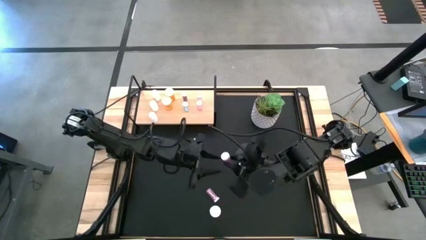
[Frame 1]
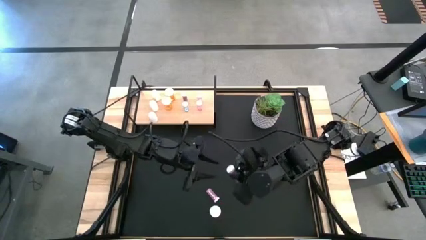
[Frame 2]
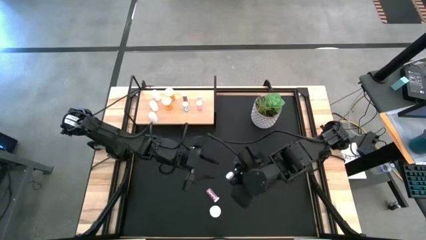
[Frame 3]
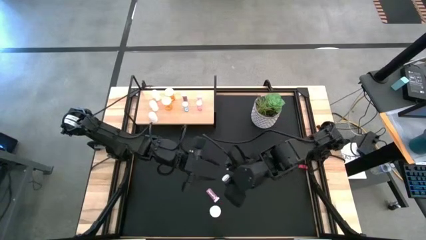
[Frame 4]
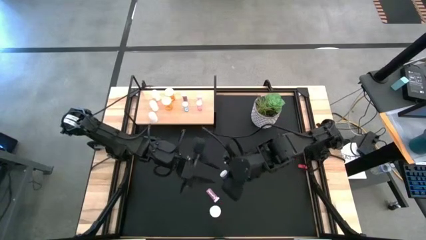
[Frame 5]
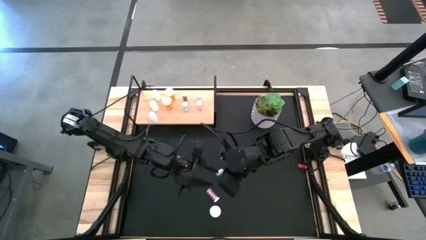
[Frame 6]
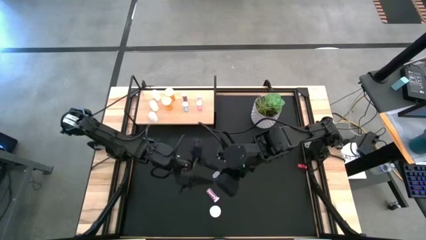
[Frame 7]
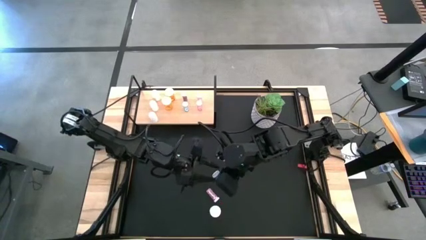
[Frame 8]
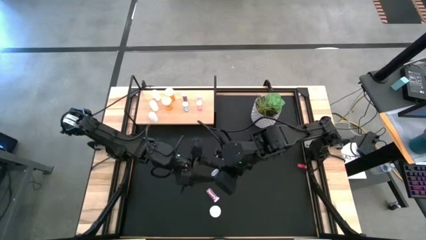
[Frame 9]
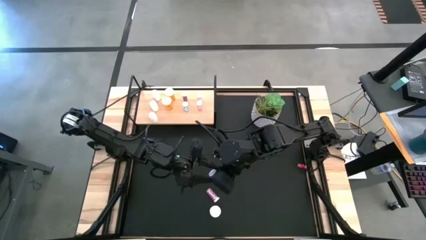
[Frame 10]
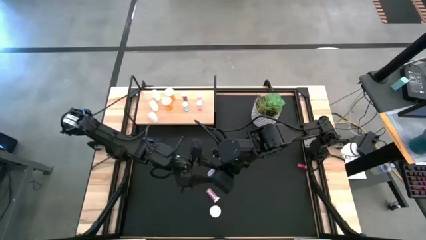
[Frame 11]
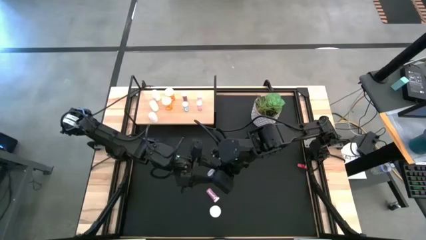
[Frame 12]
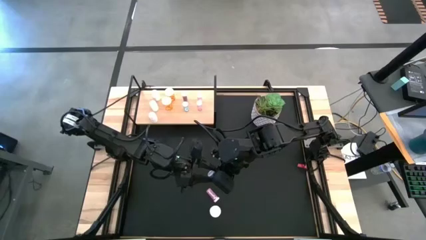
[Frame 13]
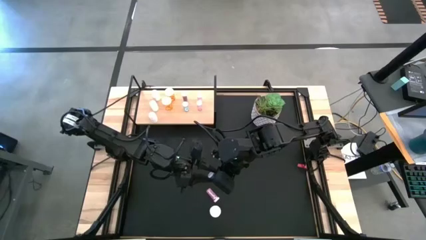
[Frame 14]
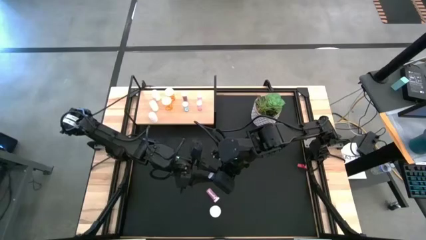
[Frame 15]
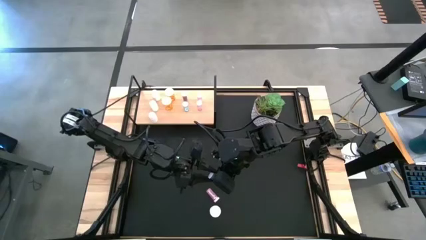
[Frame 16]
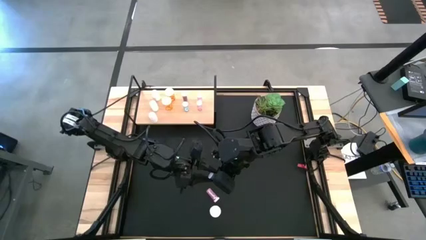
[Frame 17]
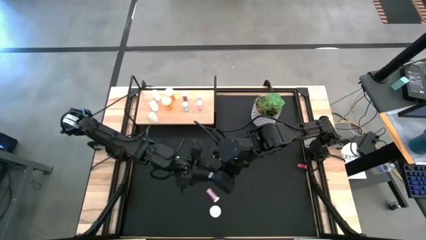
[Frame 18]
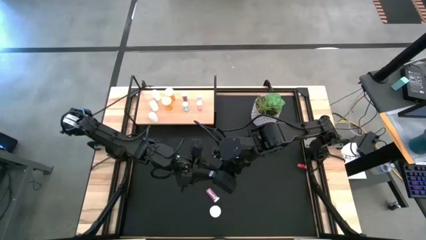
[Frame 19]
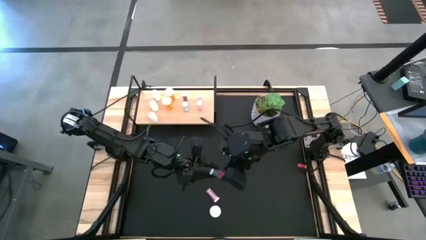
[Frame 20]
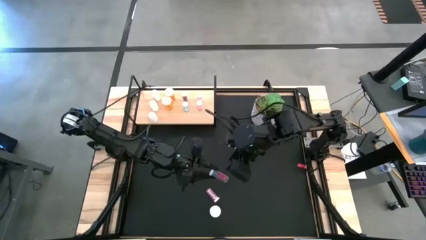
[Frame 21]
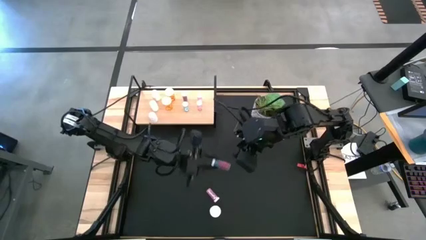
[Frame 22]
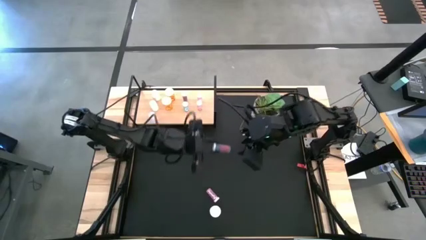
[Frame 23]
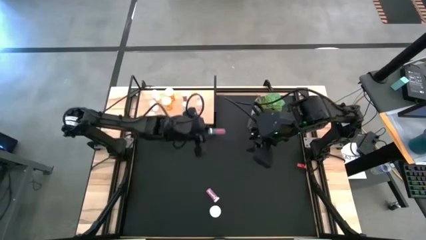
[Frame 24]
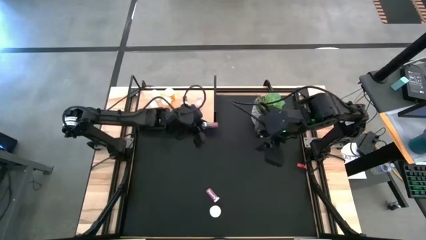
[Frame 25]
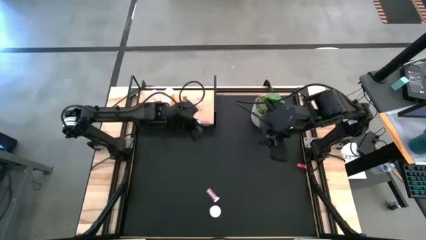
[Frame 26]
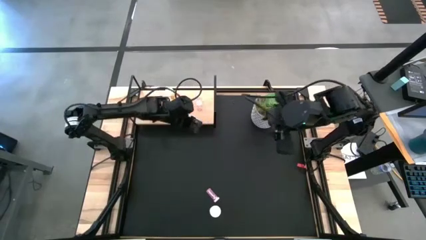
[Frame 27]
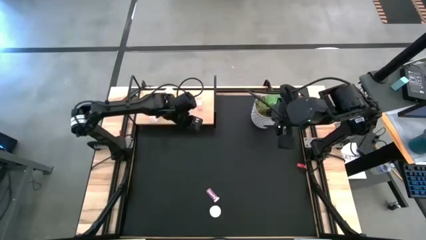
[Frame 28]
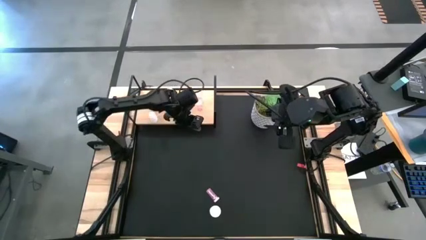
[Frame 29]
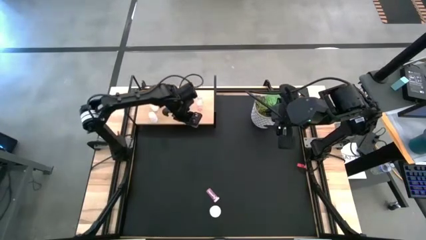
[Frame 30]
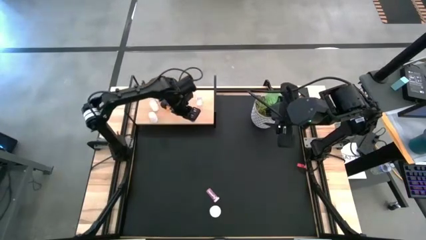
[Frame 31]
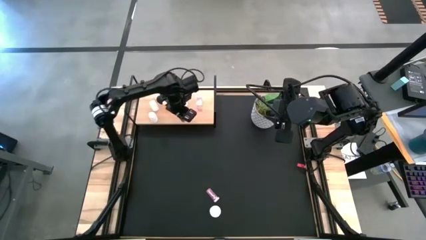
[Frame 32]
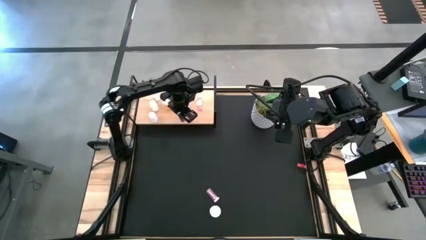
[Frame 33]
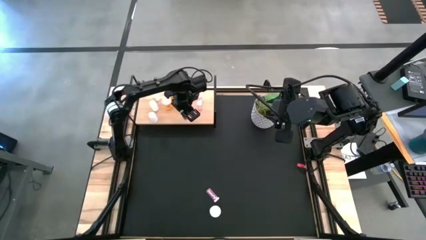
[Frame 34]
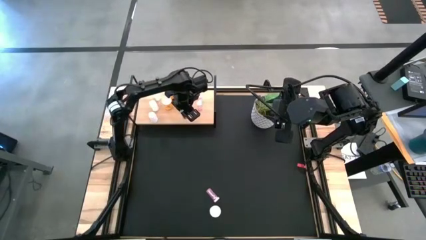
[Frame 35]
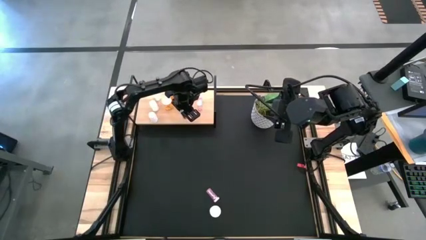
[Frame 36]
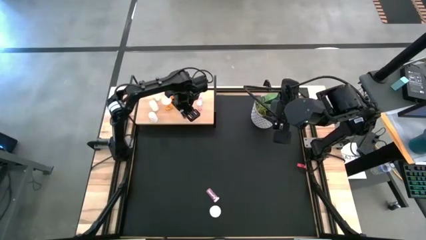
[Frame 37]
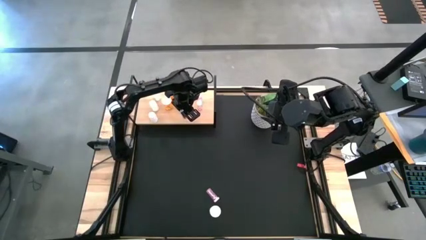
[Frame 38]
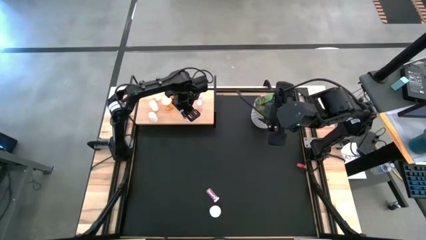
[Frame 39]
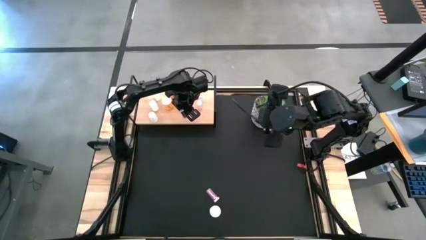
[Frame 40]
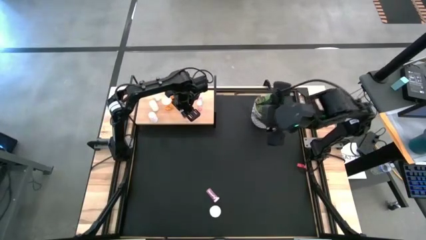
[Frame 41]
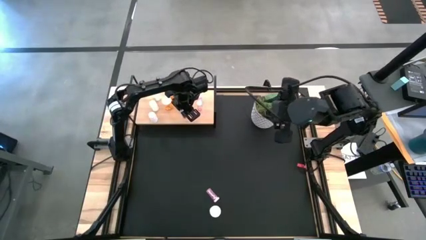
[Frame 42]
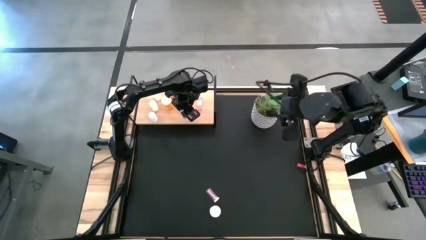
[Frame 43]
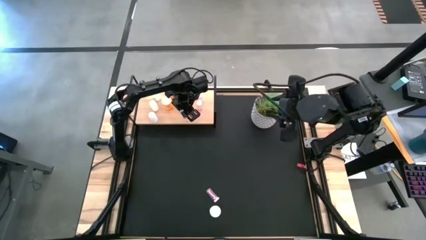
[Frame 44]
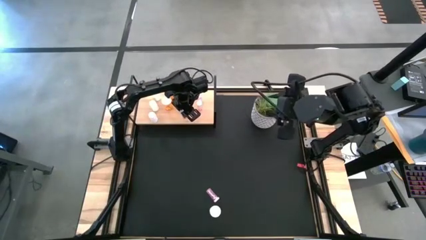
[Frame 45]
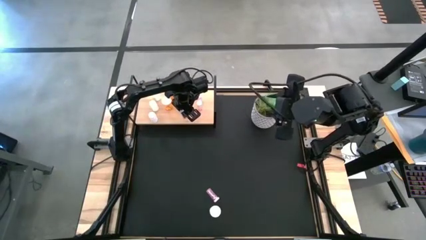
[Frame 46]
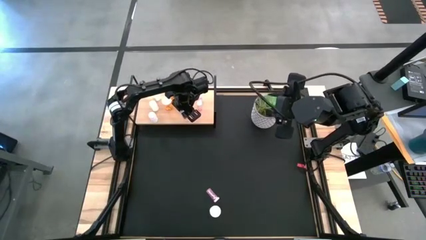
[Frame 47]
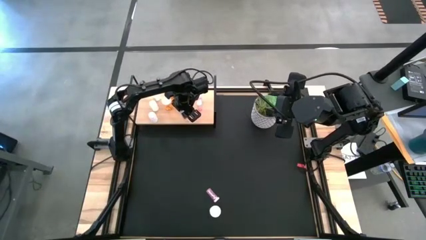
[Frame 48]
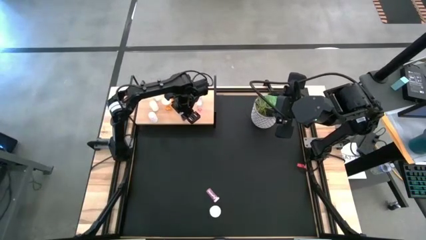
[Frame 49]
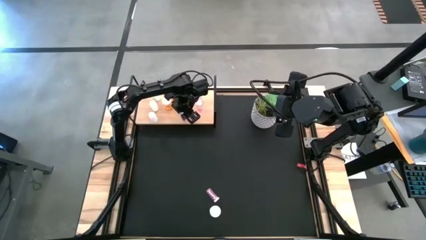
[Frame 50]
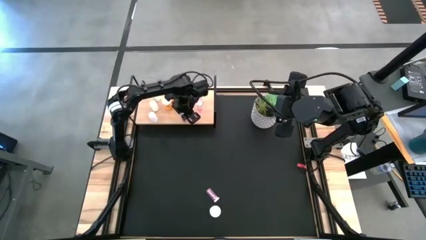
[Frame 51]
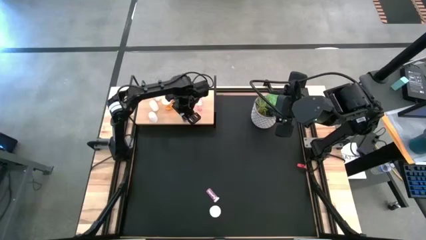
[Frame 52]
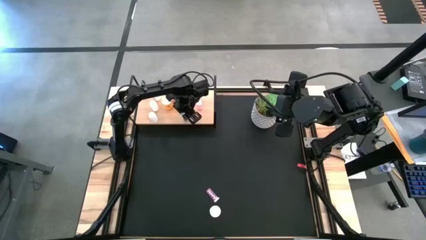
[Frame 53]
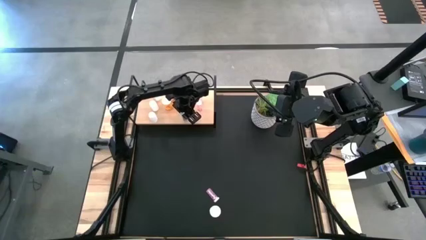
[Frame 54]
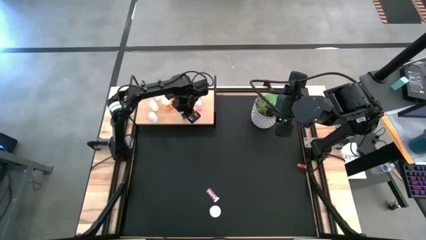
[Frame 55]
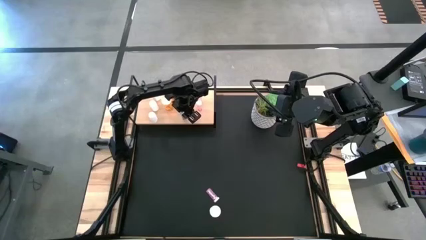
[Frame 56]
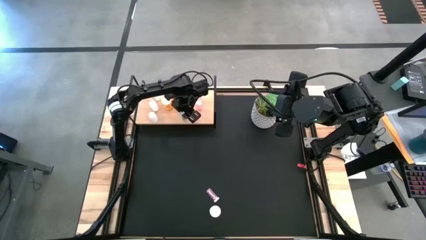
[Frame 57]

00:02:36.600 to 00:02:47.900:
Task: Pick and place medicine bottles onto shelf by color
Put the blue pill bottle on the shelf aligned with the other blue pill bottles

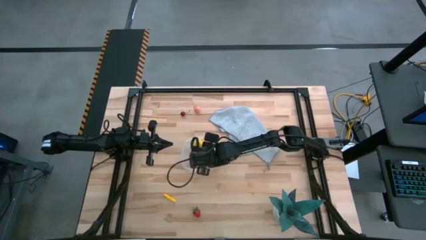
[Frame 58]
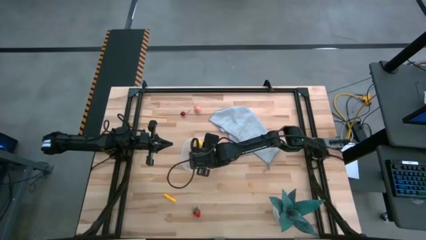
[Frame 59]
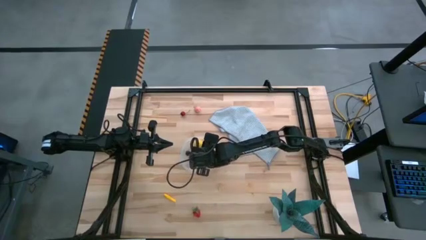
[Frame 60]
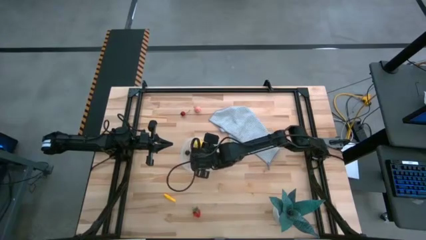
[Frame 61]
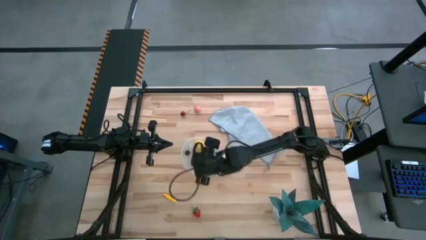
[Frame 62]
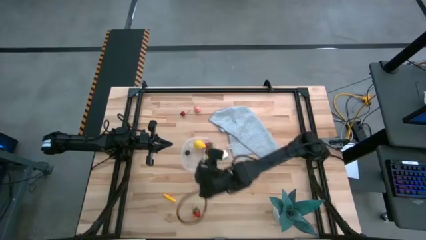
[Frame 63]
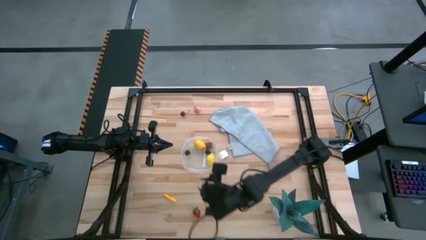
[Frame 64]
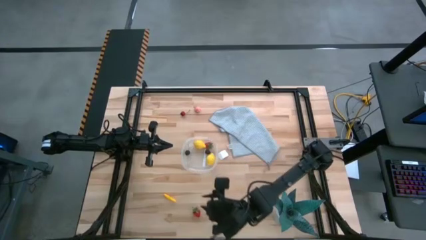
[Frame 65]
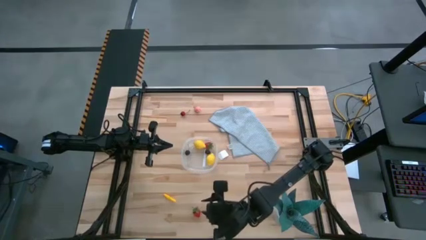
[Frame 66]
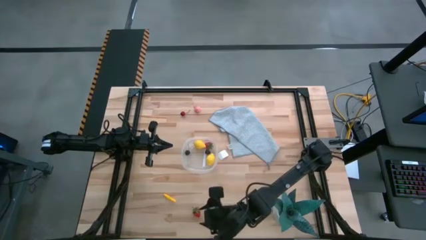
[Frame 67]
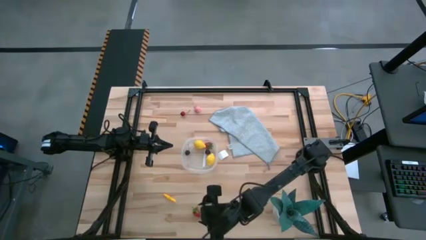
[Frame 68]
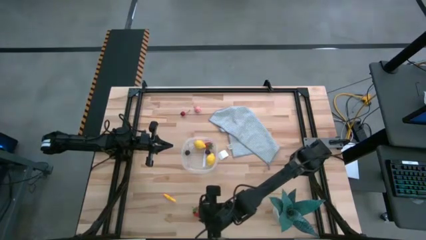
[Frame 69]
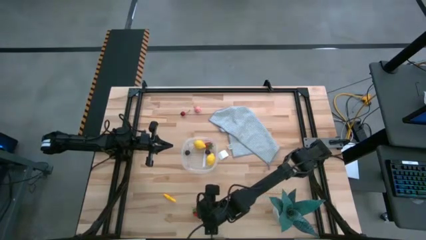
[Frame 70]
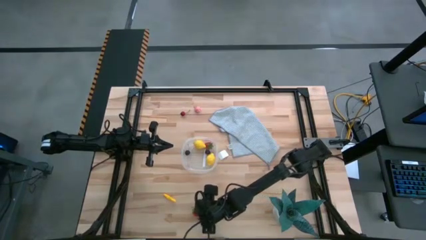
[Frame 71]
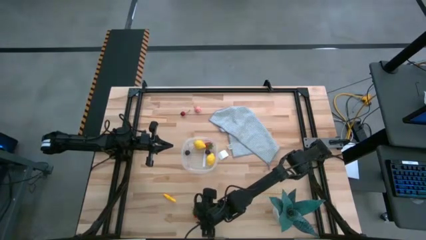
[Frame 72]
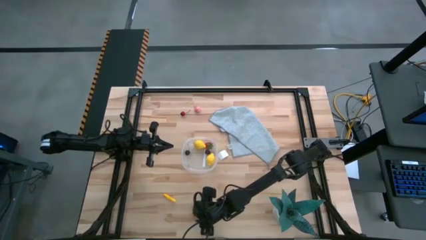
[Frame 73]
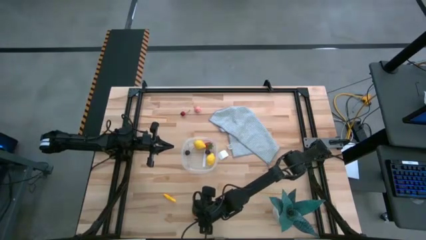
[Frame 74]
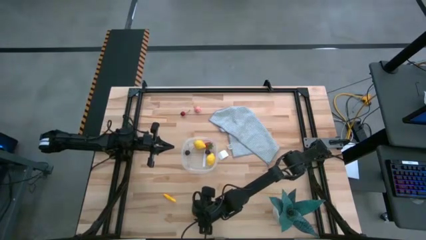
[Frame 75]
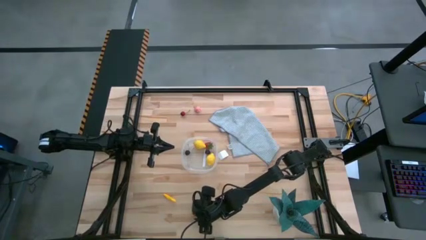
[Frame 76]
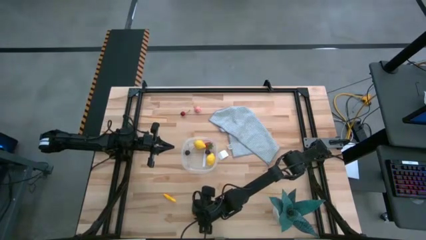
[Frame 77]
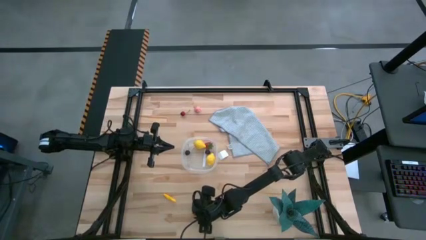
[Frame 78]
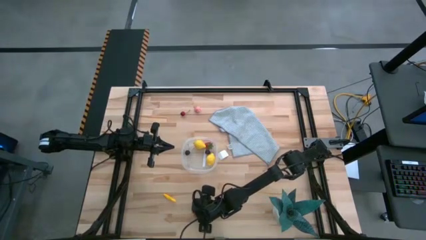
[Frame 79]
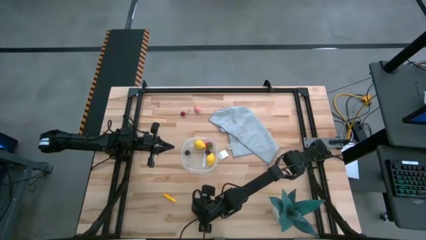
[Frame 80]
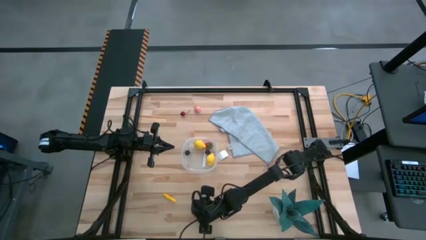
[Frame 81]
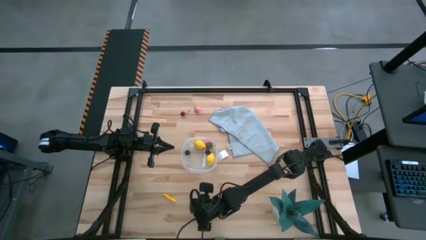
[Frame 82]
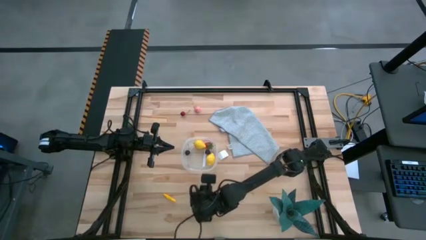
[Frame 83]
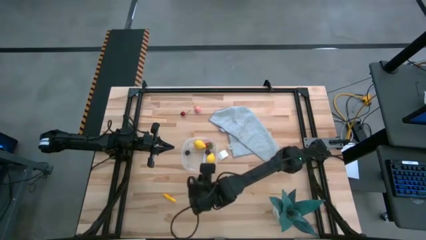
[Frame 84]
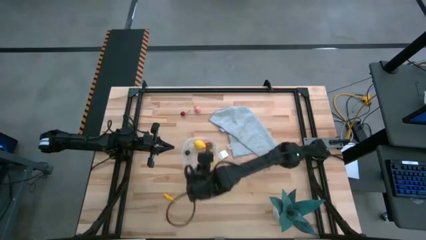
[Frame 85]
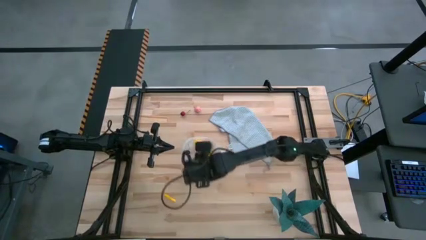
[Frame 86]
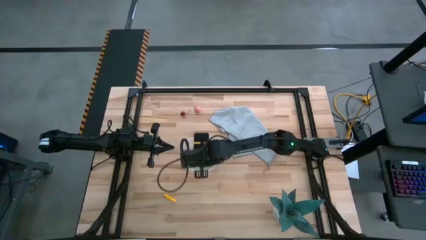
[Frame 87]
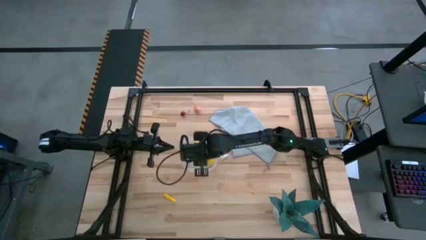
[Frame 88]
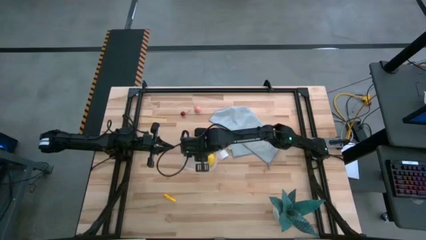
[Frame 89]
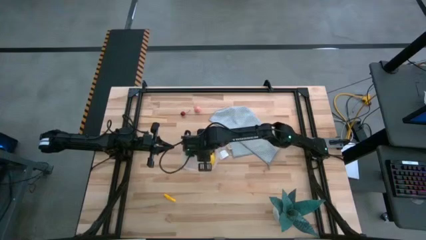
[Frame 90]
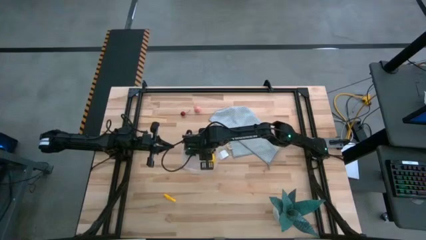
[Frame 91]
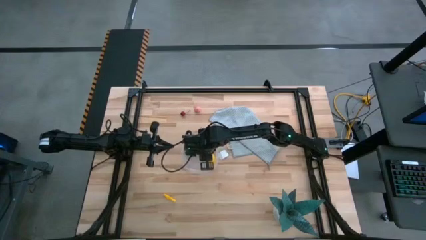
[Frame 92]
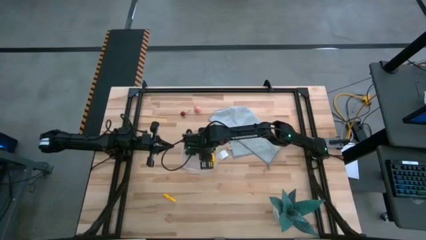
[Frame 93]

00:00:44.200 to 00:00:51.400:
Task: Pick and placing Produce into tupperware
Put the red strawberry into the transparent bin
